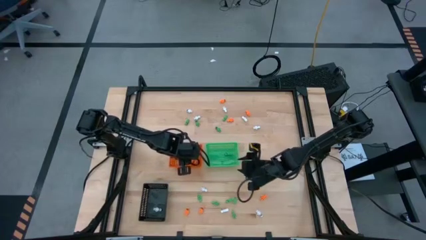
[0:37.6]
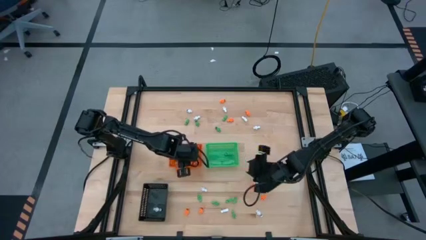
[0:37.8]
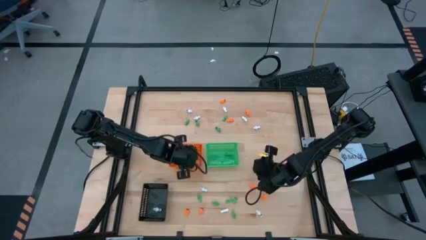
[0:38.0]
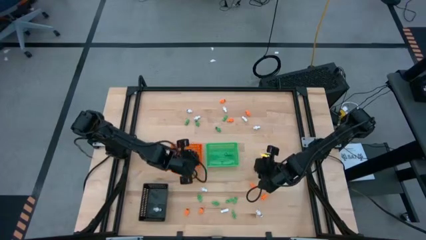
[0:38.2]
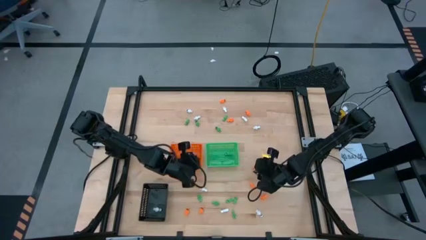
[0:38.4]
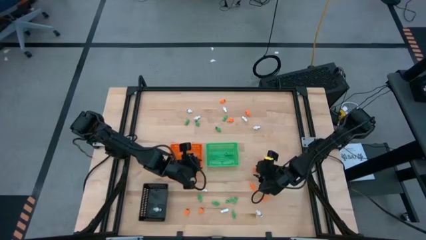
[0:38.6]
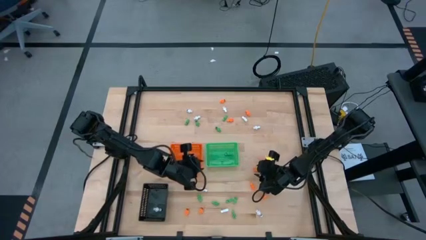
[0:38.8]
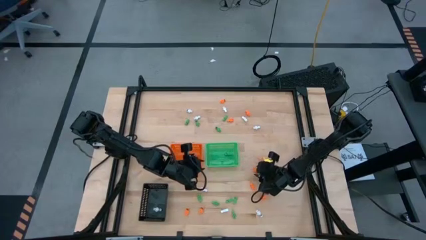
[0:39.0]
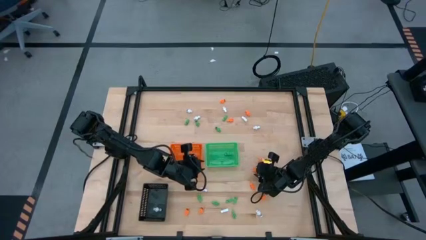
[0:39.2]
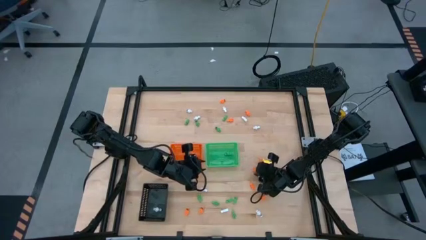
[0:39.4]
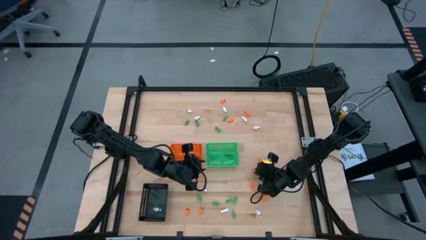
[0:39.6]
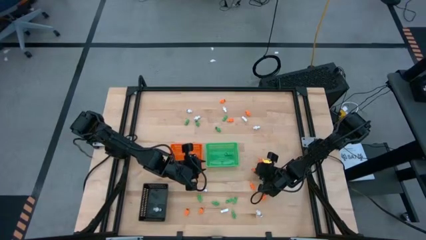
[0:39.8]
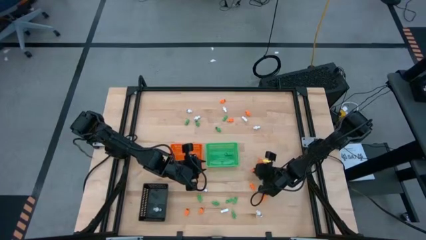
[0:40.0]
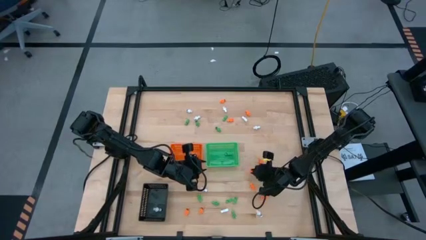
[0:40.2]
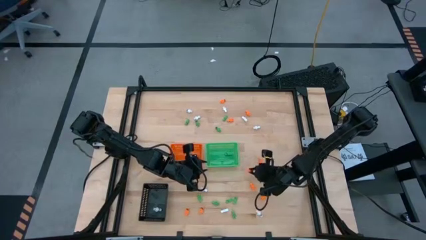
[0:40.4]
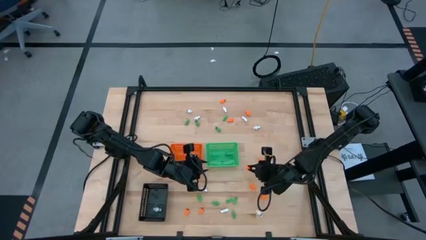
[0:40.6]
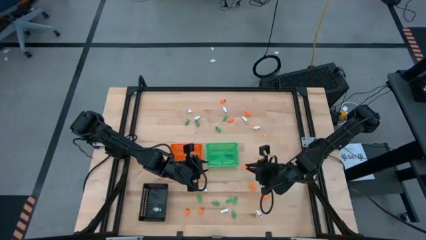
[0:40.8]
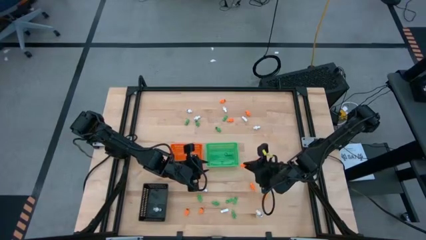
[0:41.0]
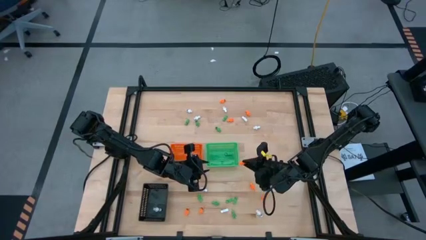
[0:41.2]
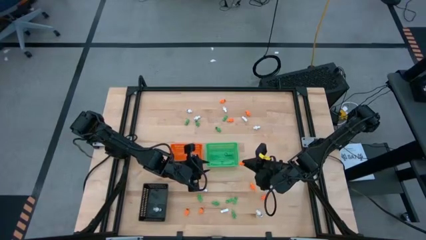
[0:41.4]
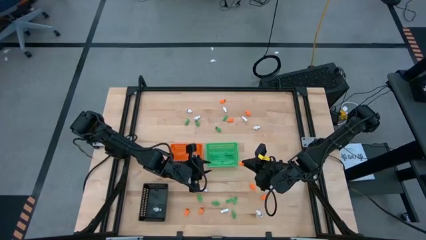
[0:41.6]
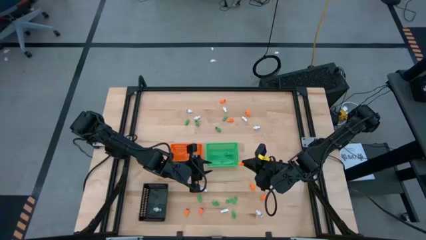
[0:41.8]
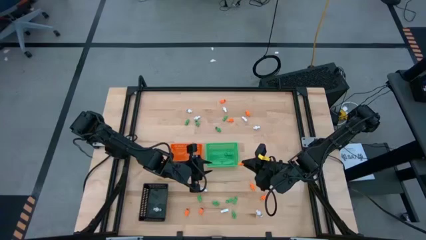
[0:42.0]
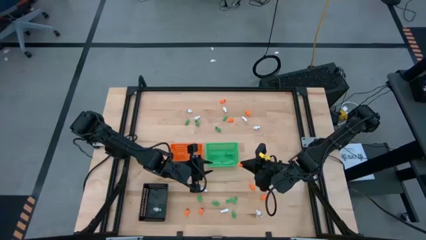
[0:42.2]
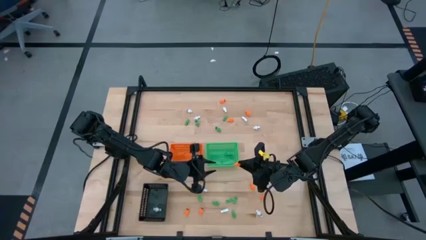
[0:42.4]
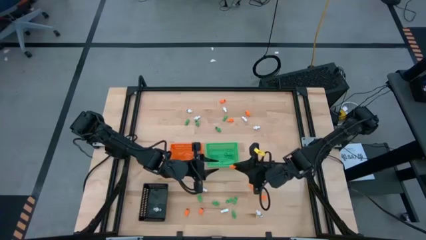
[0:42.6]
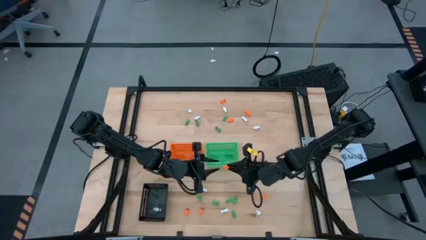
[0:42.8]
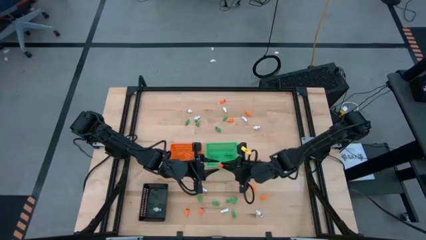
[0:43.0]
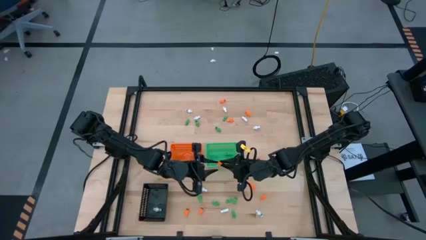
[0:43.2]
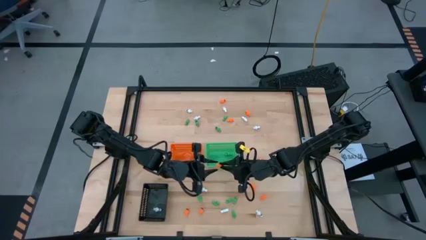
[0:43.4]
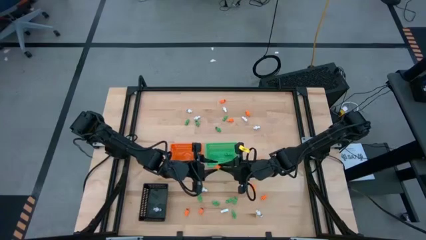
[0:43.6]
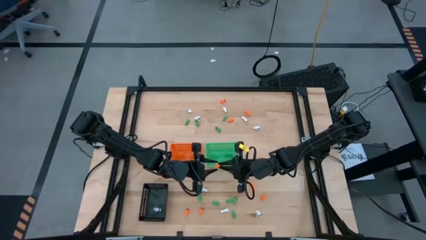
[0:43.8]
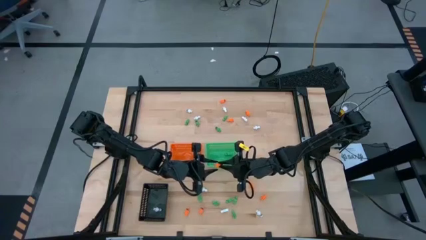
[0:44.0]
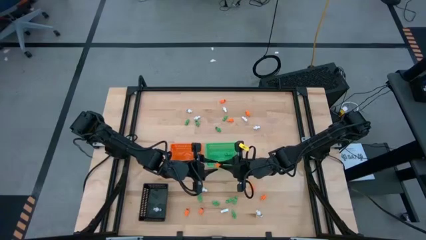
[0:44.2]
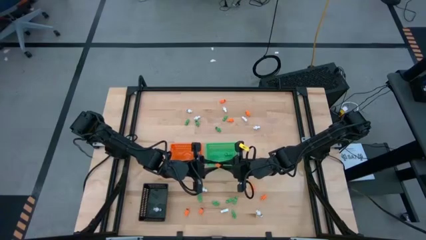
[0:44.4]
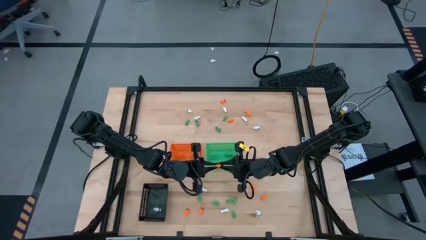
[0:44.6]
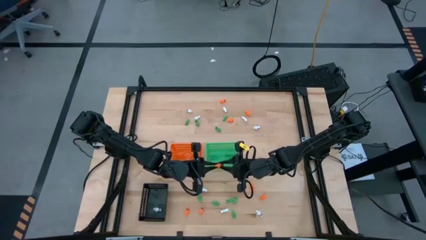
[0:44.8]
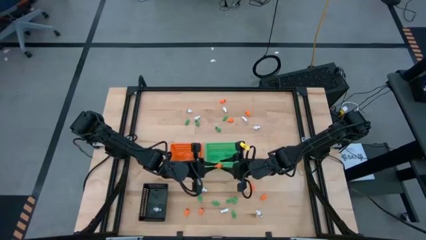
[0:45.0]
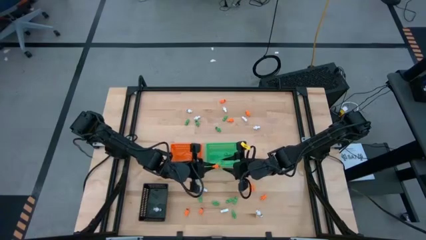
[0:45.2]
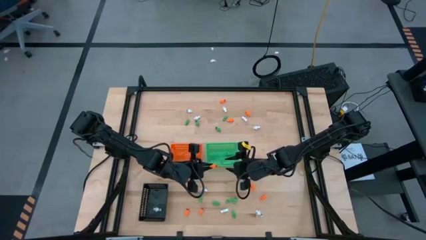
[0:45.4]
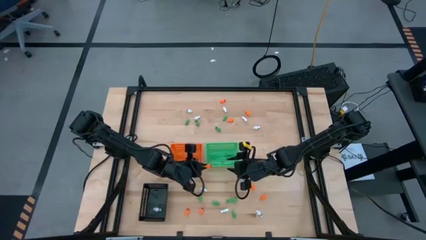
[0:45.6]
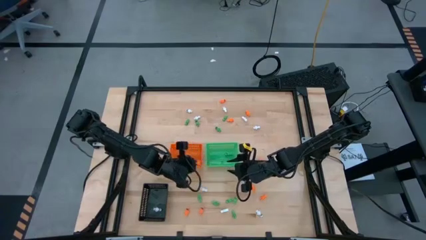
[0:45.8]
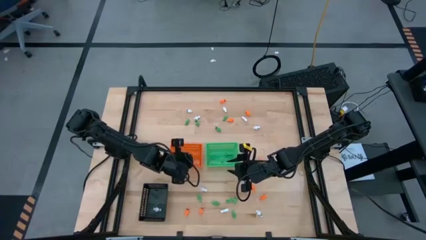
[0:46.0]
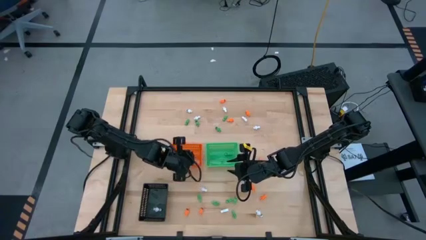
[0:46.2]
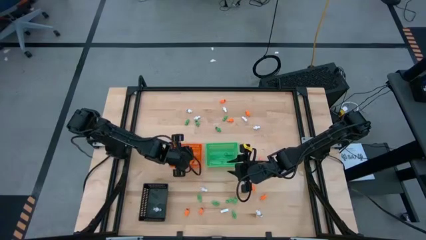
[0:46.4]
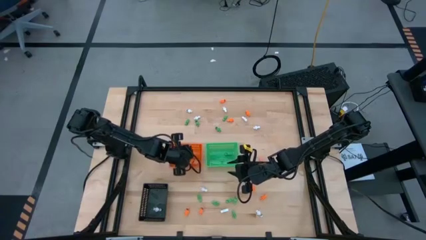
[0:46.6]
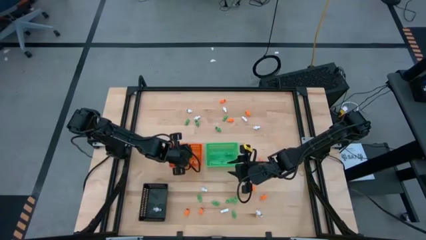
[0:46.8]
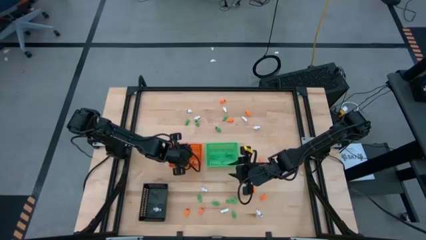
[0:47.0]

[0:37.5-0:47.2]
Task: Sort Halloween decoration
Put the orange skeleton toy into the orange bin

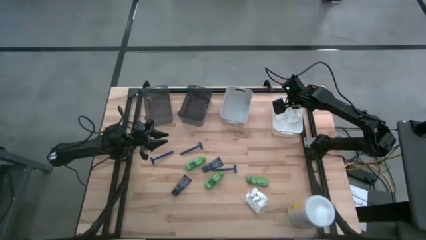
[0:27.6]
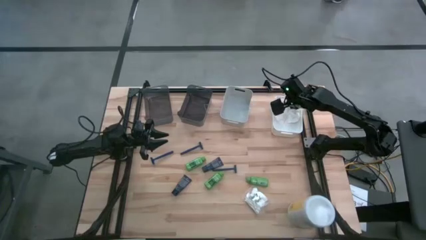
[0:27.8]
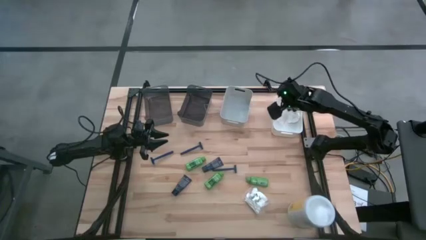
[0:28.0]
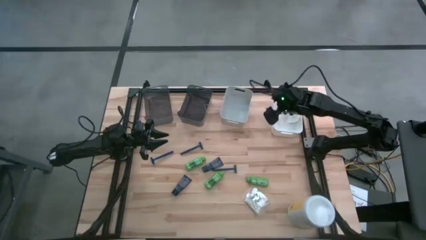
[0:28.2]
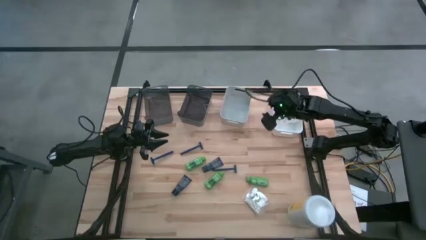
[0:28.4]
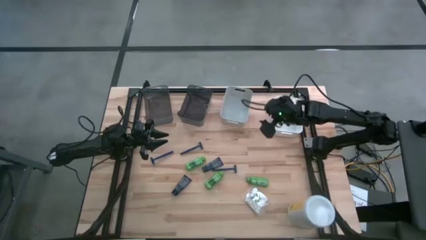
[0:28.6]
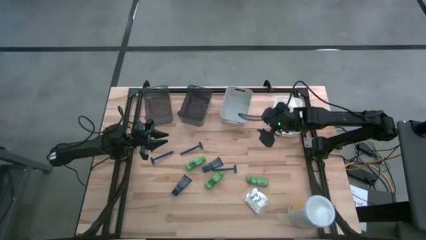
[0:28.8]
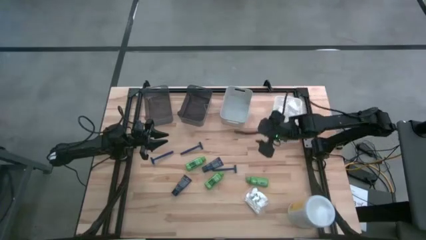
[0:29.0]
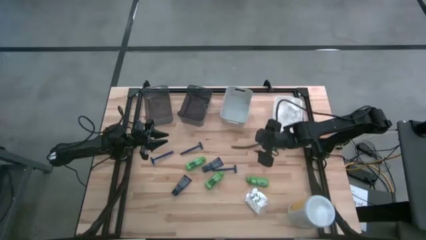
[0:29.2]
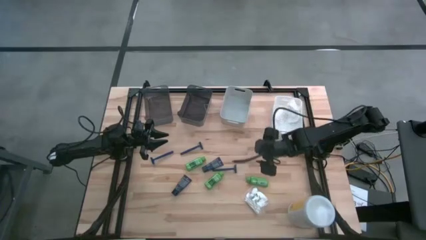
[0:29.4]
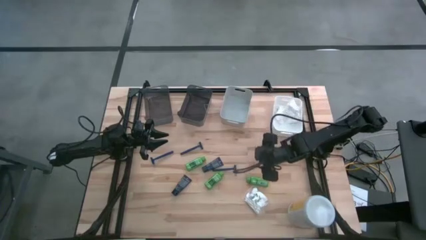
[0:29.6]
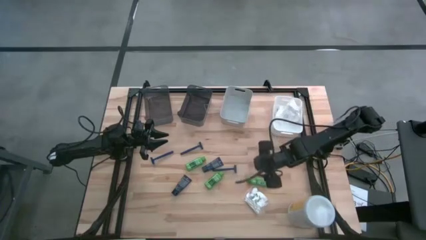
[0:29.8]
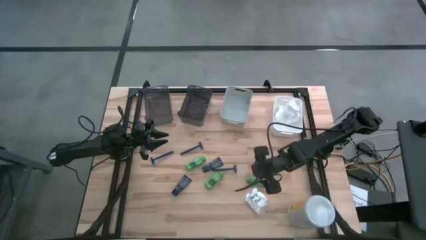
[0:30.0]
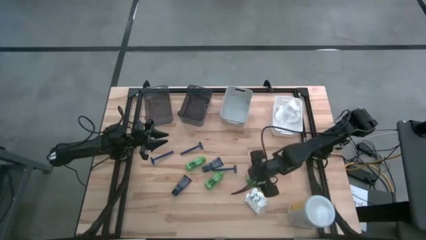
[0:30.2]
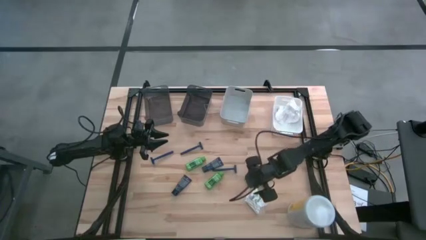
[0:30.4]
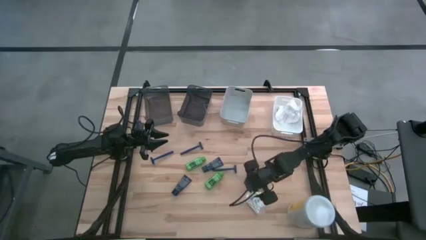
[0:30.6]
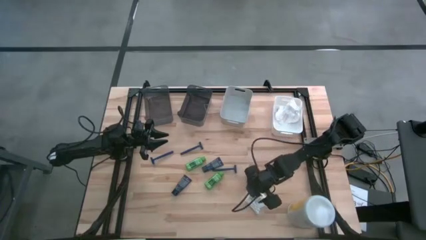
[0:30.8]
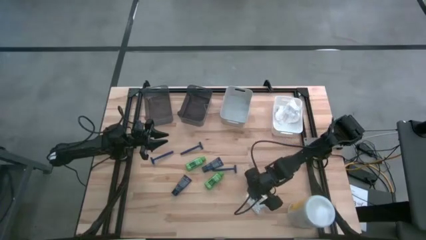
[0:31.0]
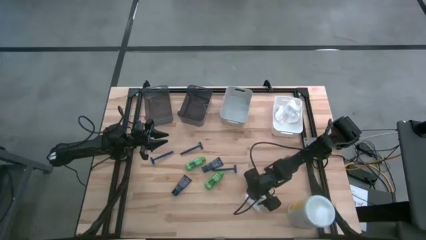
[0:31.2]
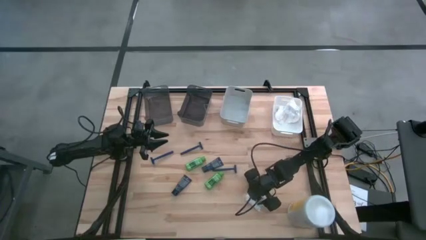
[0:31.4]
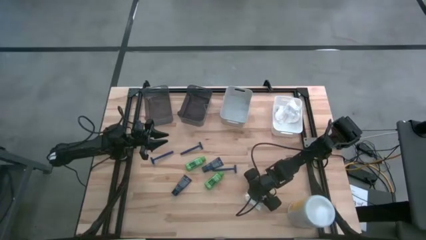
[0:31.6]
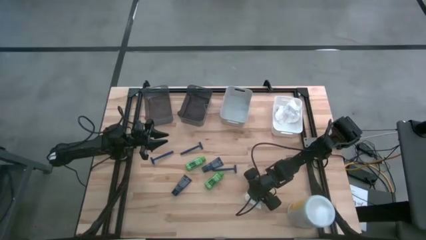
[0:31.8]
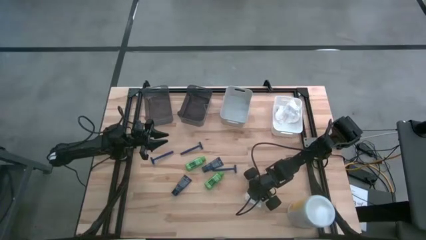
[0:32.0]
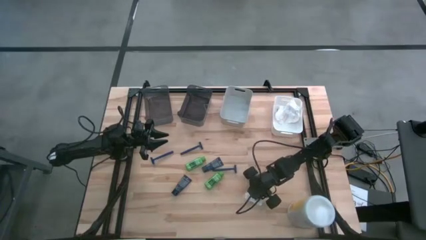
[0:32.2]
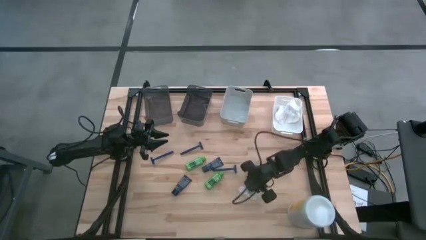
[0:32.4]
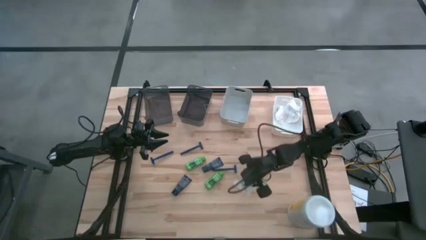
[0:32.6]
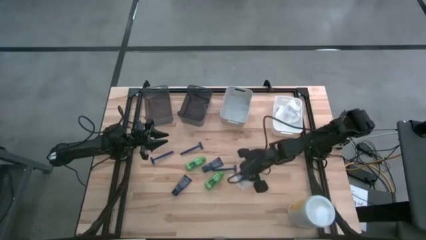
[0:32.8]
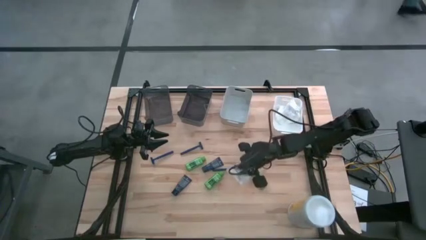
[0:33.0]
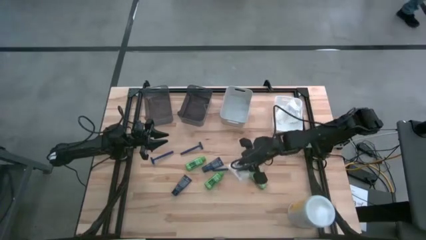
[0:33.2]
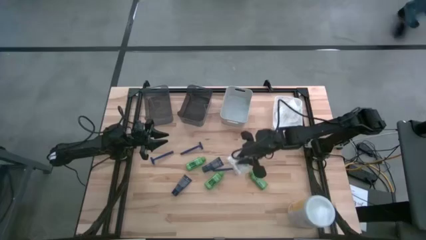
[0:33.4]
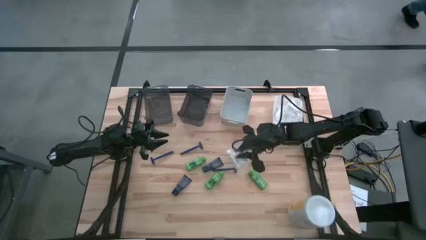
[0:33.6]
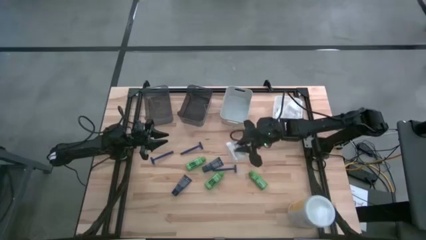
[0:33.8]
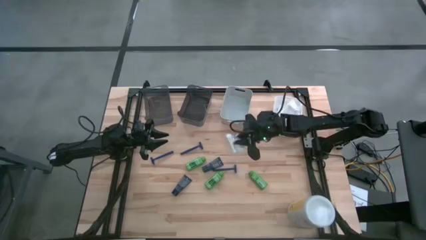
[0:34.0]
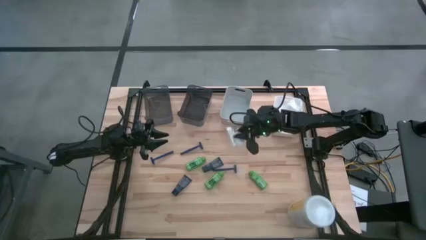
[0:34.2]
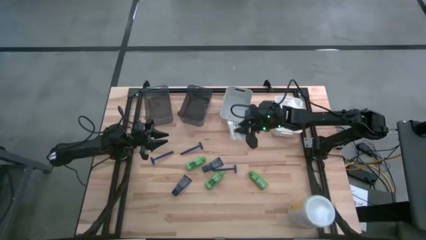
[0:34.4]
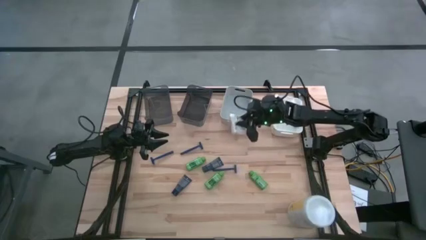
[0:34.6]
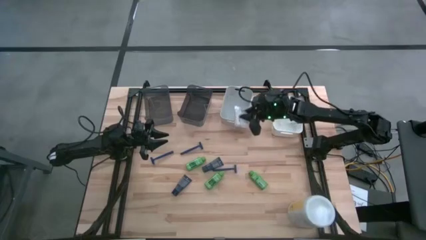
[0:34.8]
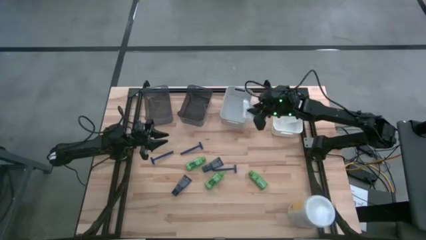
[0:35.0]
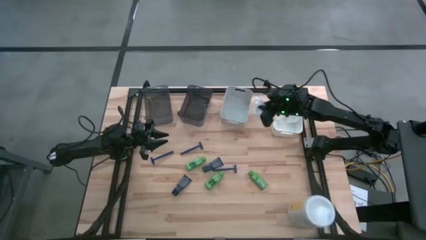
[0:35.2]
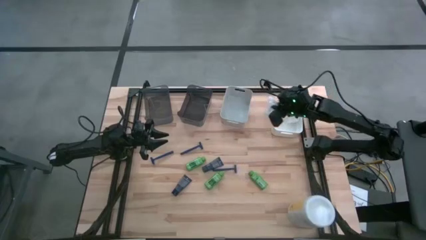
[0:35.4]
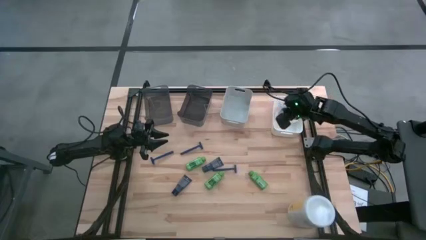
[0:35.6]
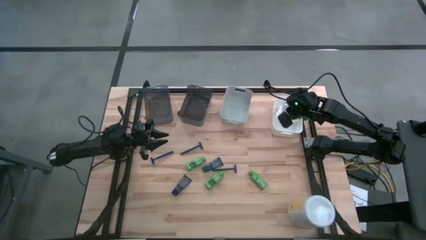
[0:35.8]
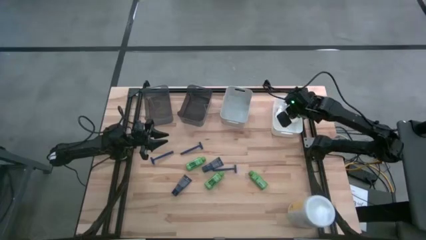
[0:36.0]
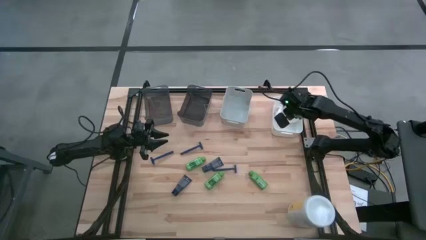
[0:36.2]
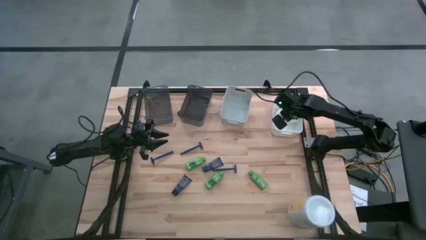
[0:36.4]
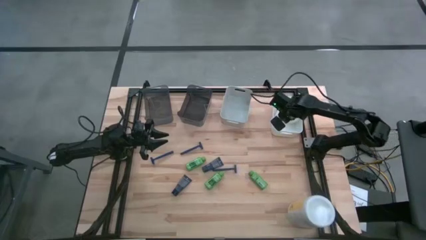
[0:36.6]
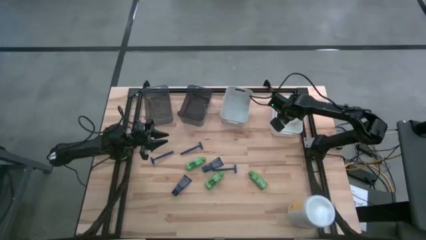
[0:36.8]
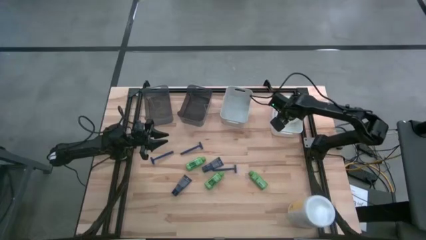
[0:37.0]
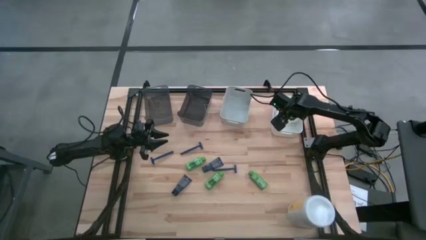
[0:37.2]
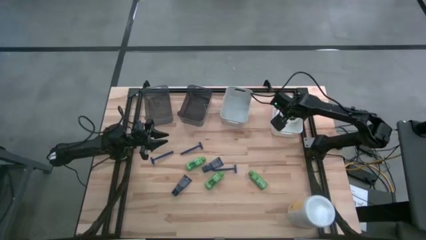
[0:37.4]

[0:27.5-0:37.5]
Task: Pick & Place Travel size toiletries
Put the white cotton pack into the white bin
